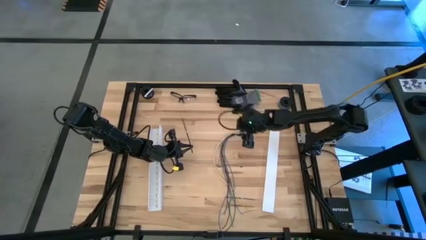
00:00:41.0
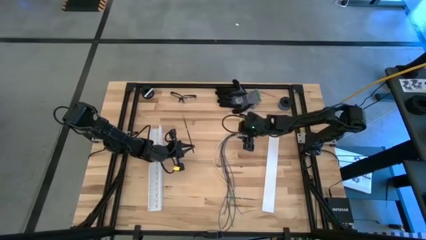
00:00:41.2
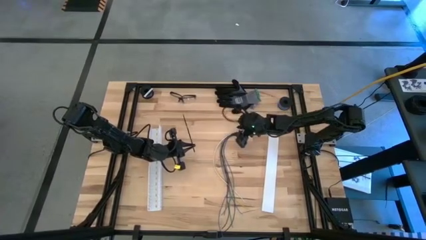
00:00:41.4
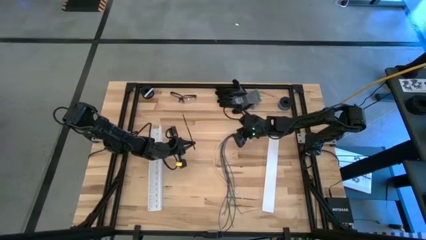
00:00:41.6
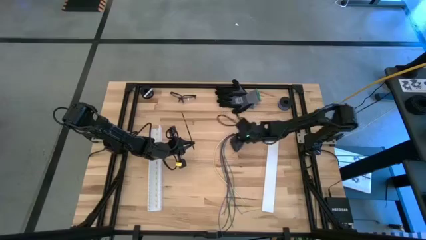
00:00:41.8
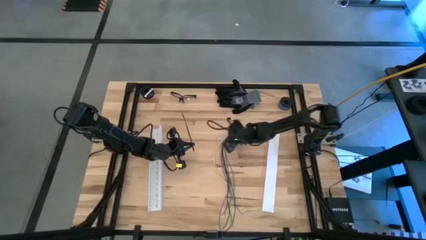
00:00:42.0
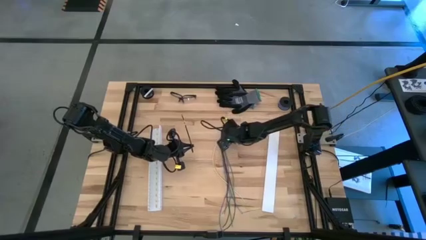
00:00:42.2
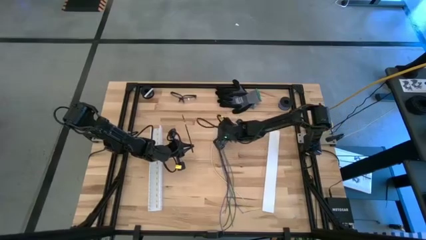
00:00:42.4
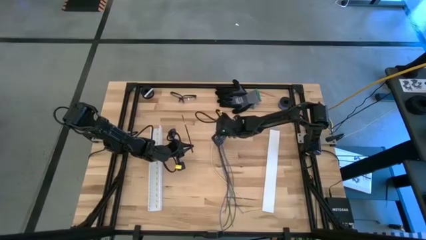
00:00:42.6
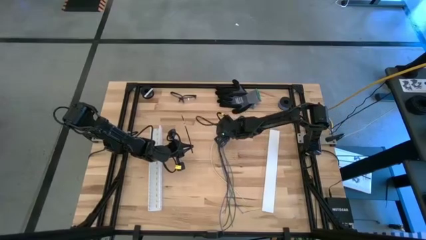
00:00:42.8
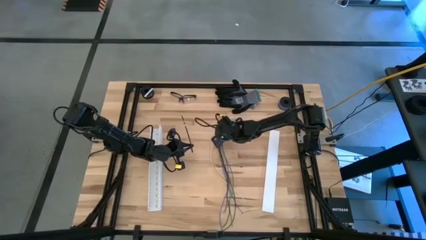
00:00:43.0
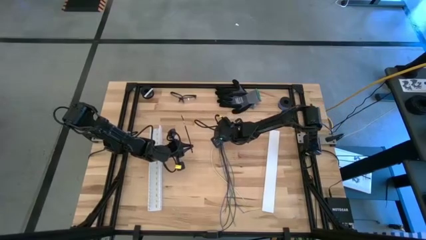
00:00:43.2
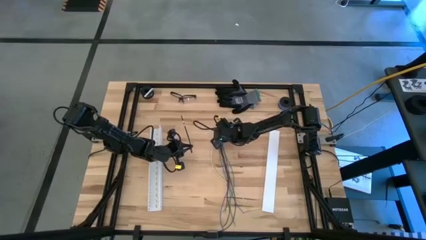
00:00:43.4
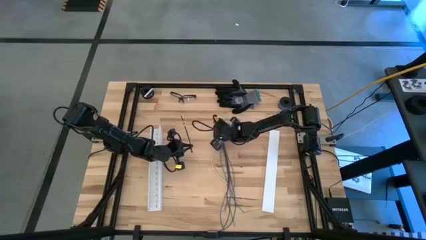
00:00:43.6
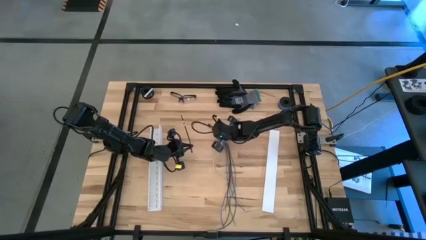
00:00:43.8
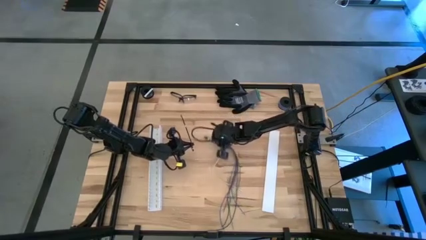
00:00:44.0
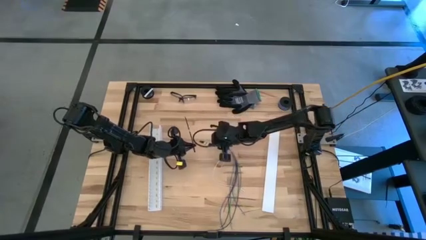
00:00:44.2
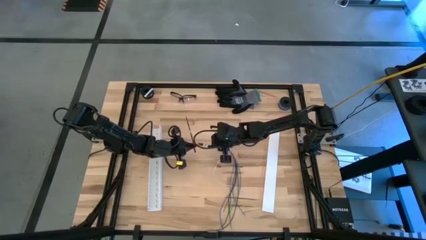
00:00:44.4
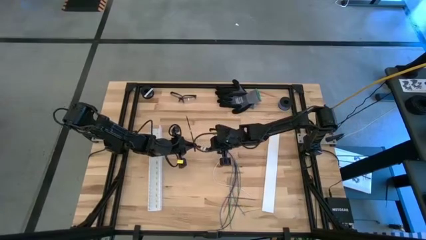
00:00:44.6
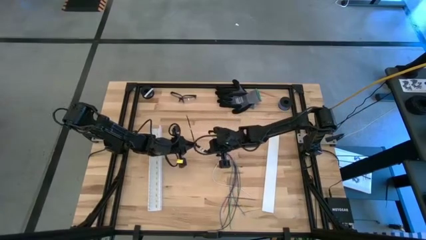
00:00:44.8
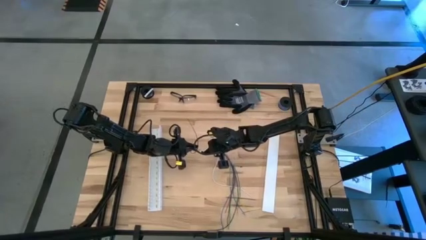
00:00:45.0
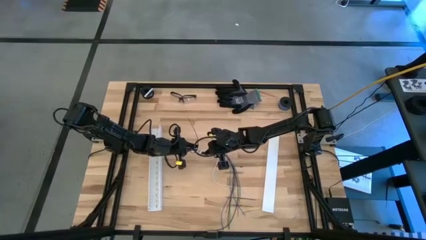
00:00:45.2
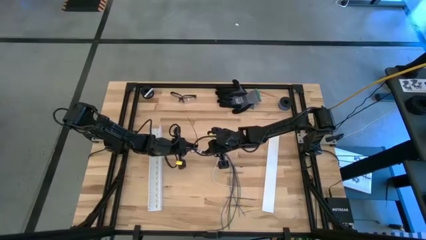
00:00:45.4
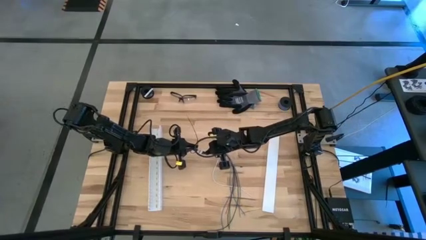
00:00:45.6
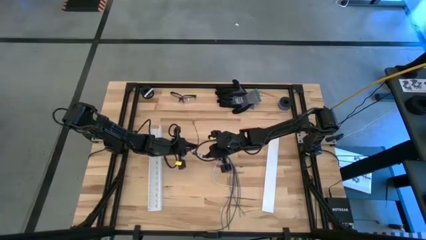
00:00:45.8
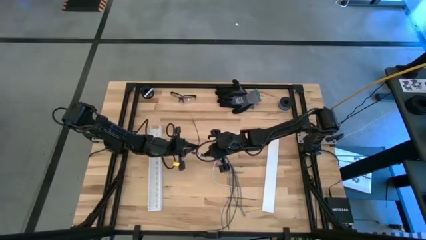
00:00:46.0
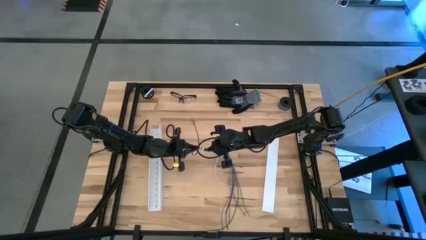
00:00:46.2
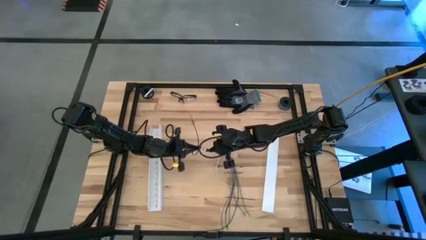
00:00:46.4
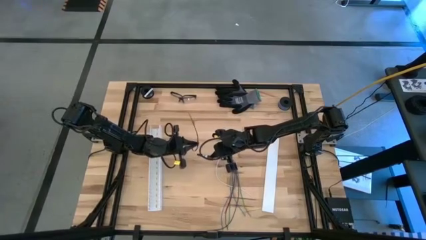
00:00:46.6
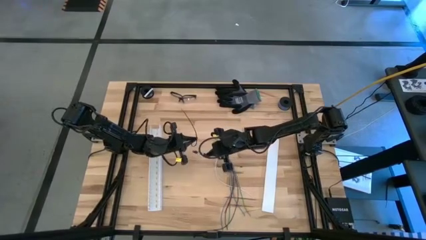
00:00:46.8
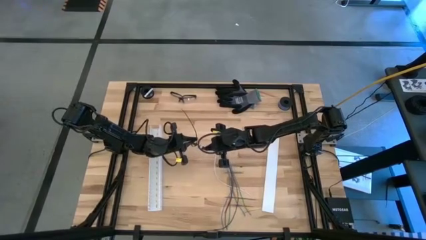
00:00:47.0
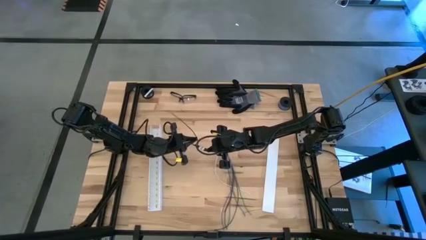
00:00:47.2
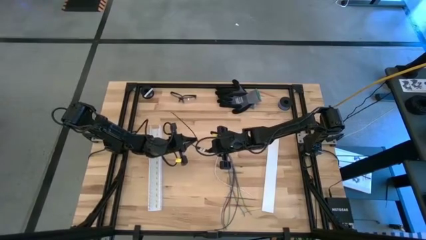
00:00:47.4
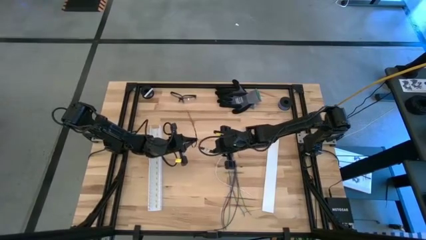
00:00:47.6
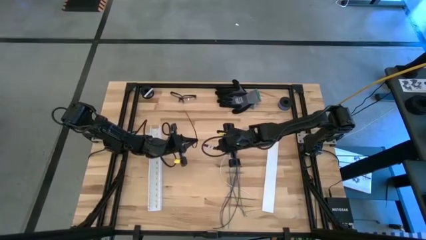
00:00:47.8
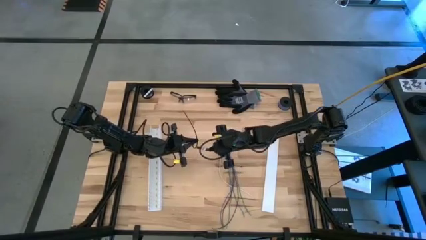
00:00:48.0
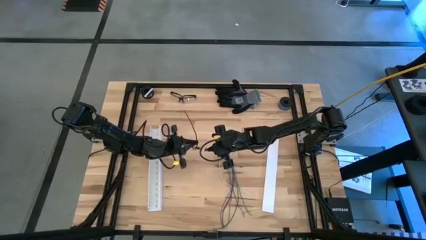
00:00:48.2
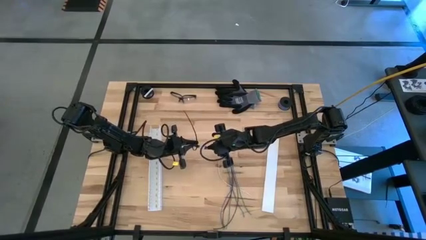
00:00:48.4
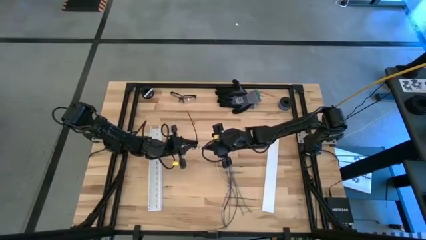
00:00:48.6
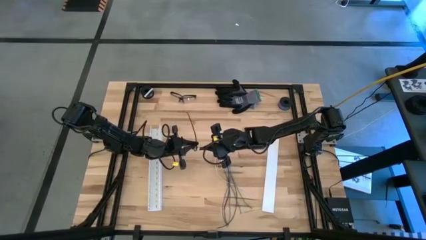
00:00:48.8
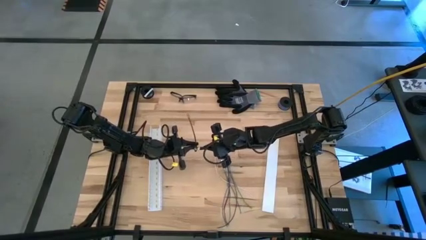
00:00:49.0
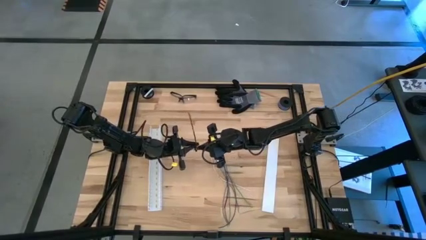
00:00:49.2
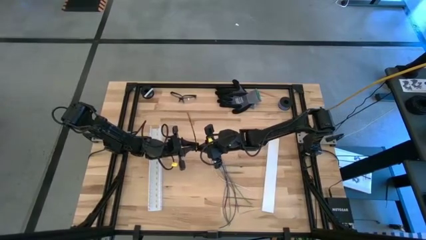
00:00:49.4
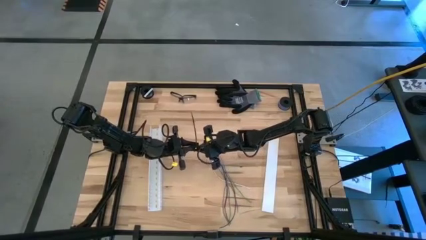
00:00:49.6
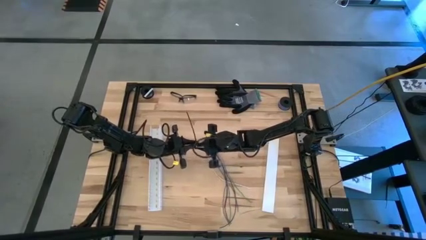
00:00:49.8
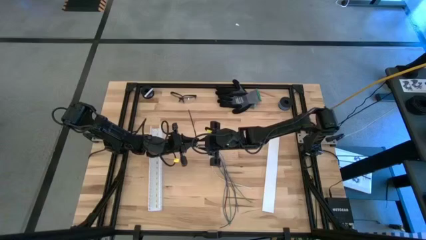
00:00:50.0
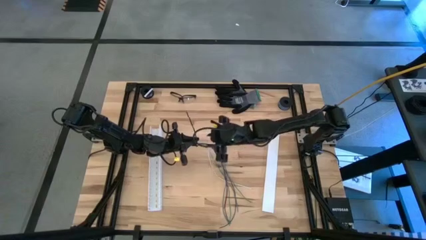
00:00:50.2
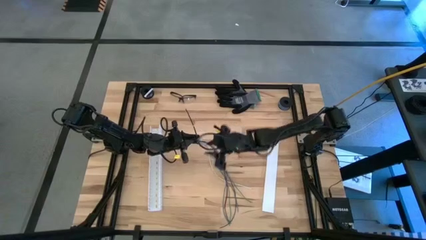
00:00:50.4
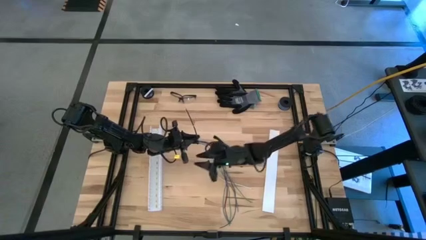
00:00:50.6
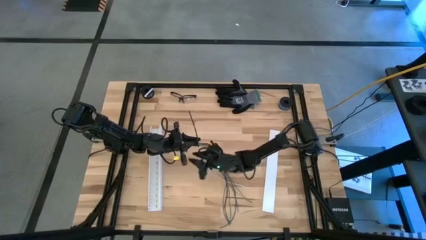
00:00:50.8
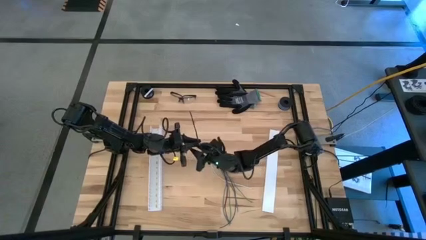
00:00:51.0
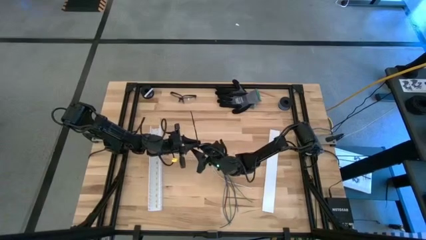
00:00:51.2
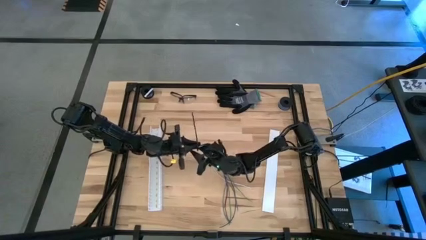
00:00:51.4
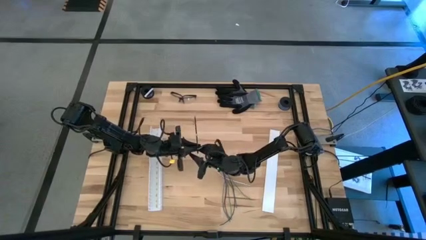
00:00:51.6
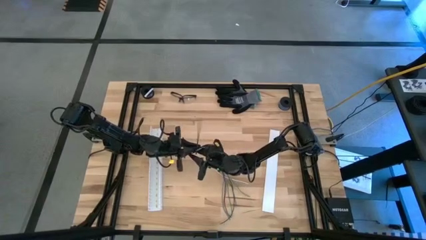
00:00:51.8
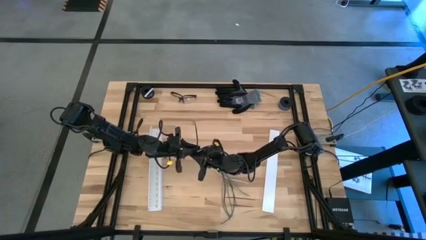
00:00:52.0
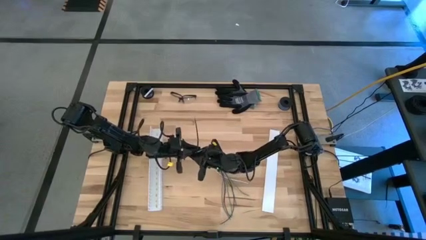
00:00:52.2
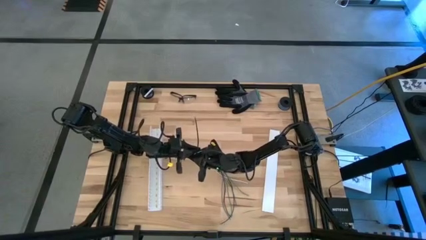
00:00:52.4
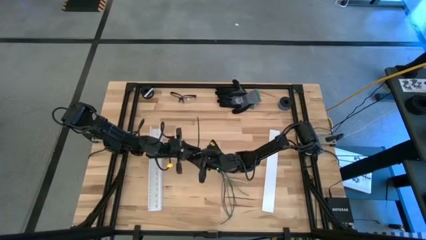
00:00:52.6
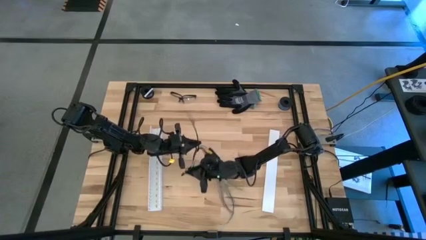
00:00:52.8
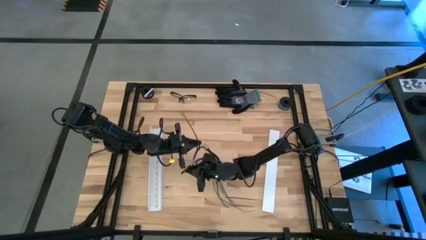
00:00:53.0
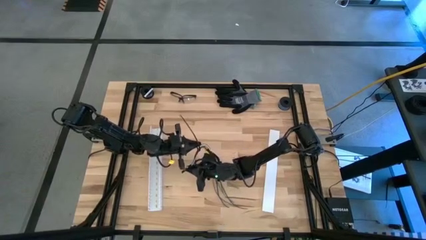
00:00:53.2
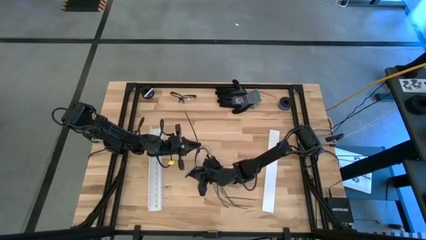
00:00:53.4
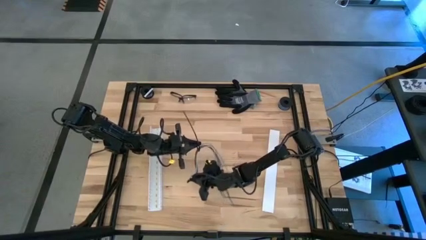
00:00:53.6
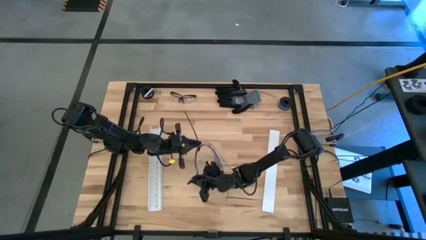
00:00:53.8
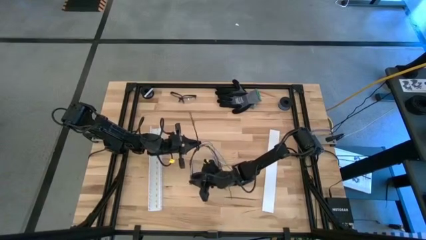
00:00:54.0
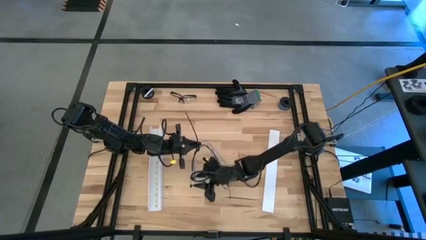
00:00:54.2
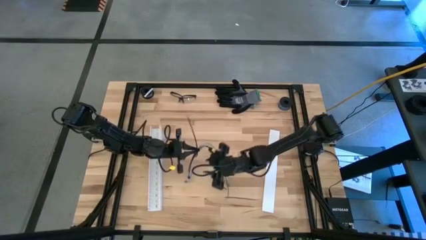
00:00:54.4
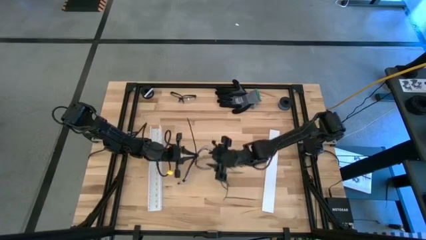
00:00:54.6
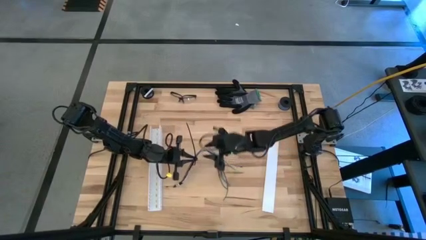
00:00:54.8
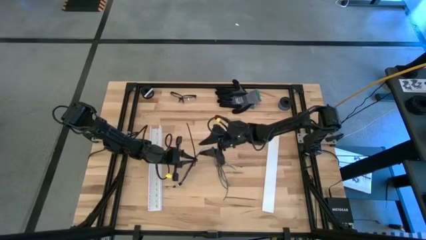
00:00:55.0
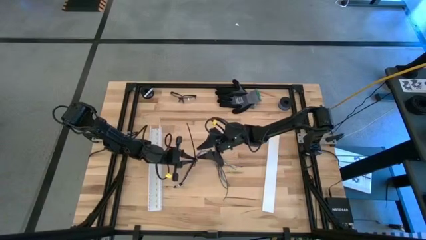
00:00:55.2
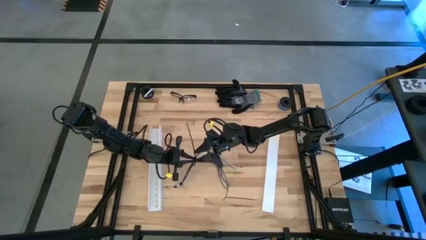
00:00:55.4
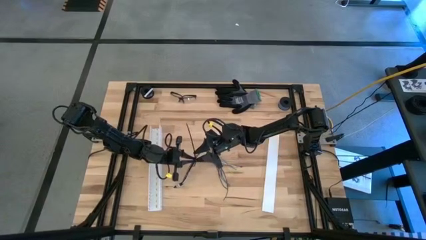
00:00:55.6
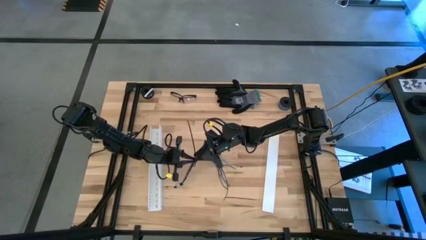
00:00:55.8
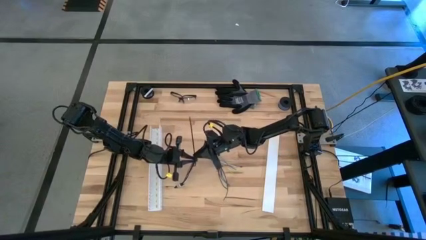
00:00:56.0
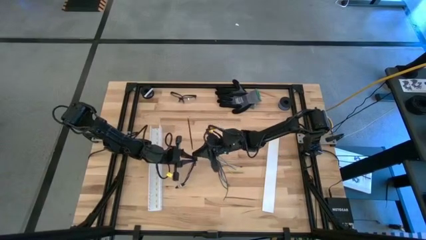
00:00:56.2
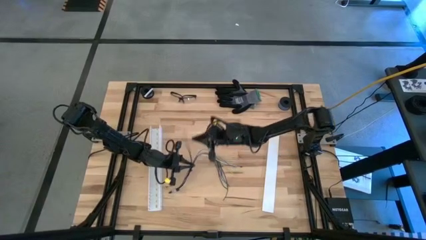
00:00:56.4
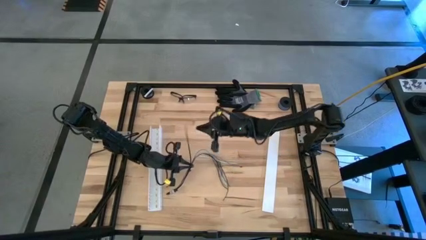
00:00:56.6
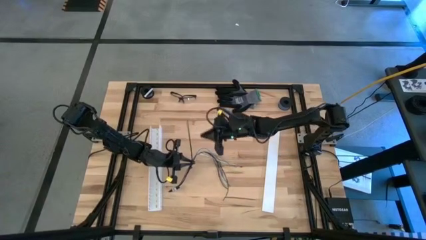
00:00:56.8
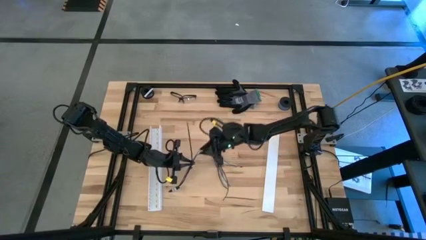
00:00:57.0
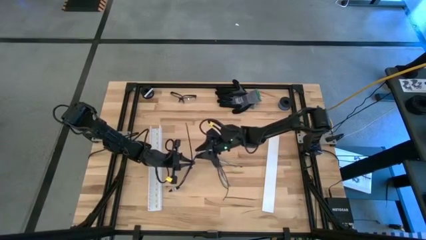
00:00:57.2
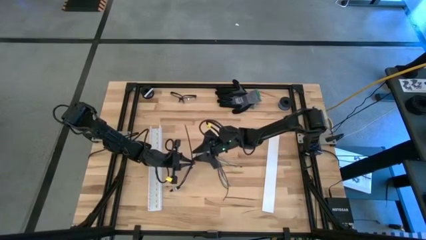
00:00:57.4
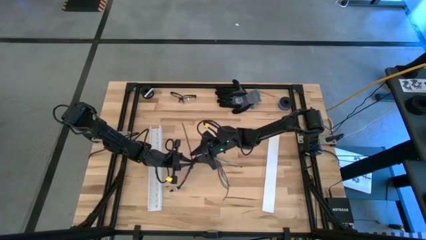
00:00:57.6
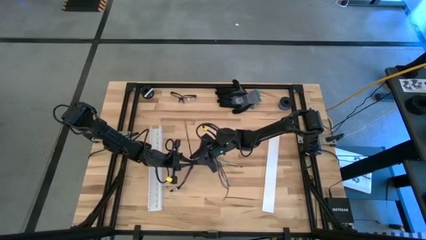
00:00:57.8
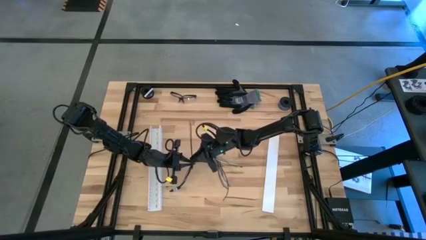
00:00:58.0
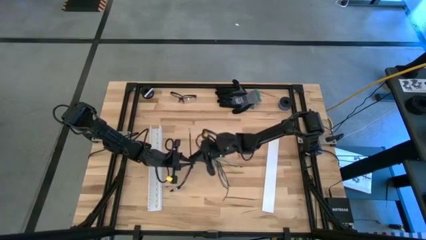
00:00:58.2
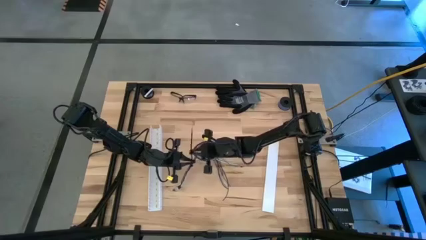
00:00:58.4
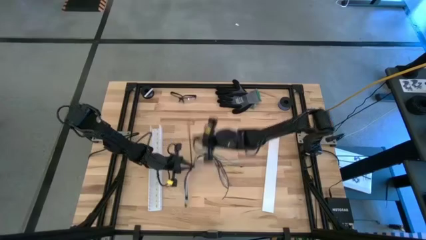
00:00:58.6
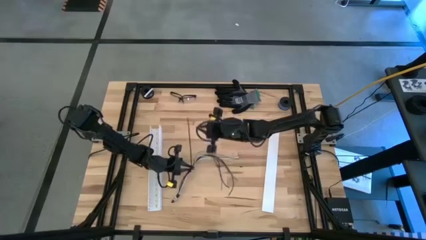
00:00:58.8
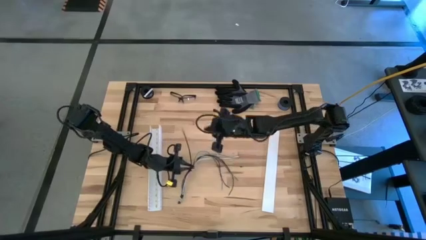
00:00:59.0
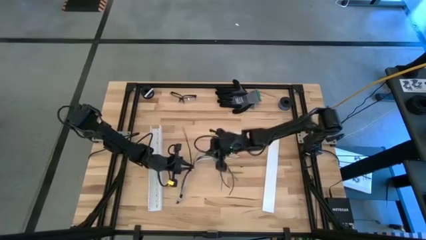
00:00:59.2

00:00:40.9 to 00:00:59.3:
Task: Ziptie cables
Close the zip tie
